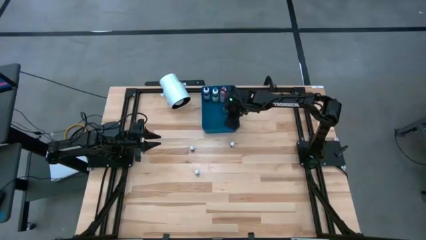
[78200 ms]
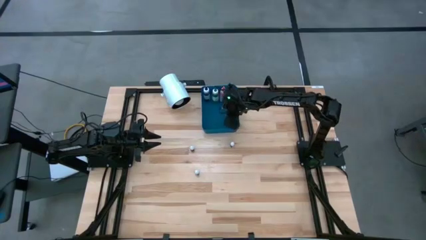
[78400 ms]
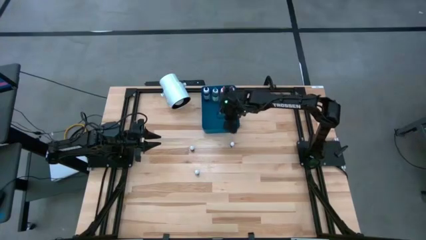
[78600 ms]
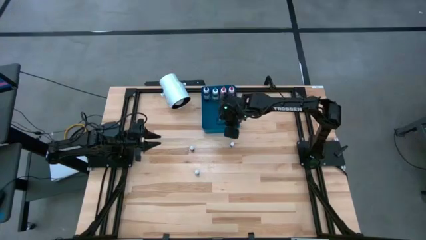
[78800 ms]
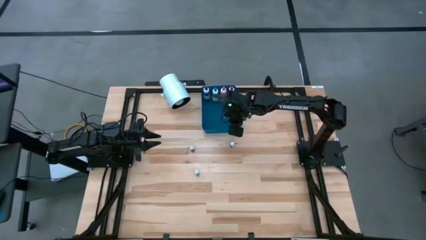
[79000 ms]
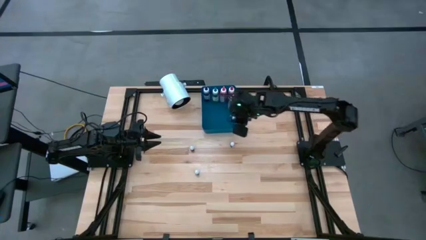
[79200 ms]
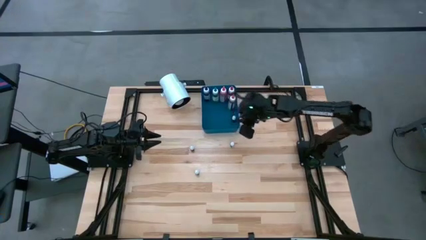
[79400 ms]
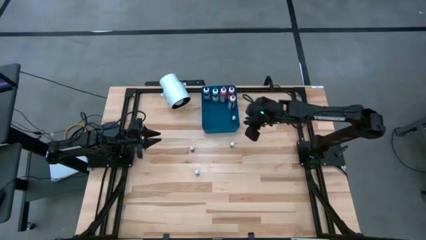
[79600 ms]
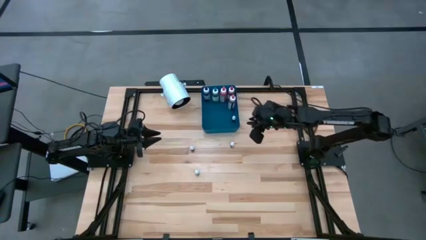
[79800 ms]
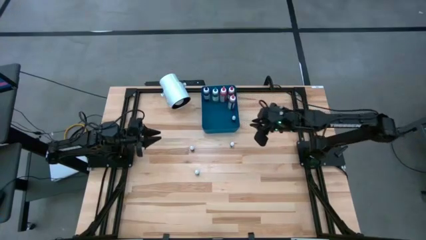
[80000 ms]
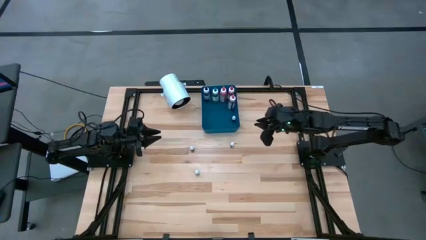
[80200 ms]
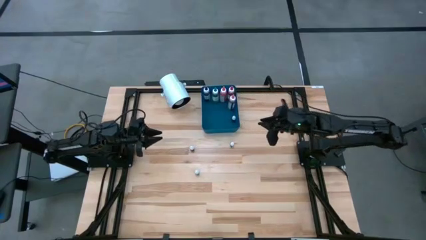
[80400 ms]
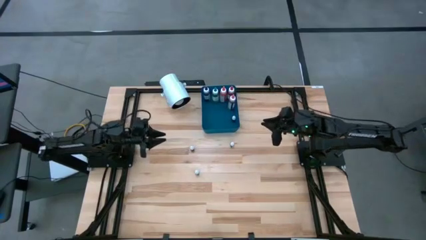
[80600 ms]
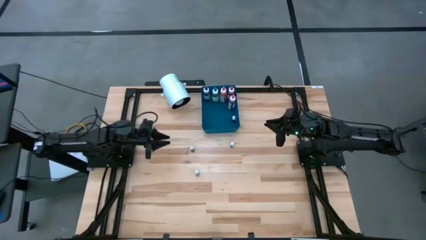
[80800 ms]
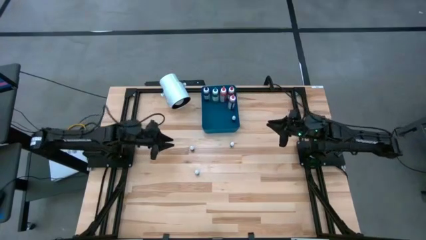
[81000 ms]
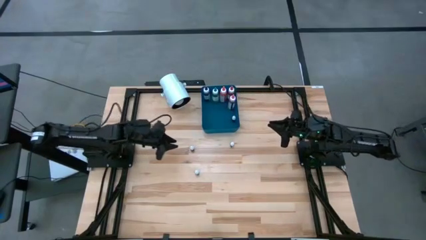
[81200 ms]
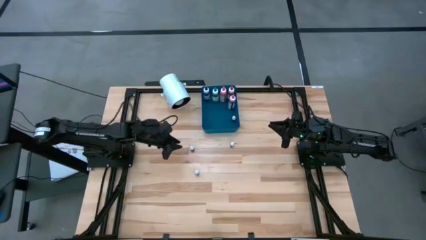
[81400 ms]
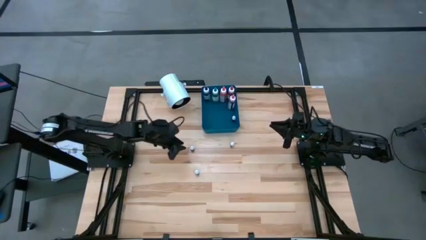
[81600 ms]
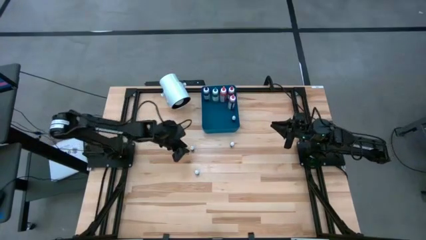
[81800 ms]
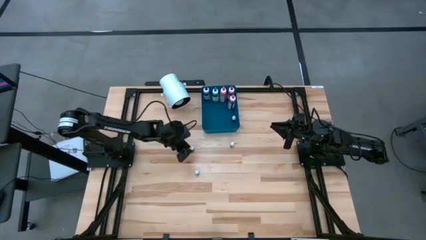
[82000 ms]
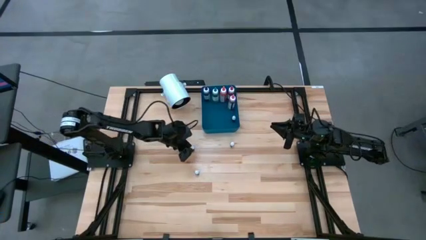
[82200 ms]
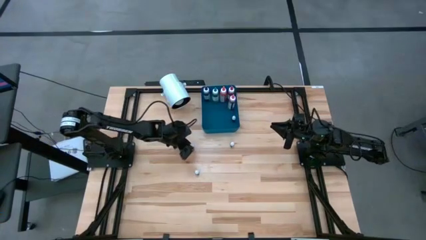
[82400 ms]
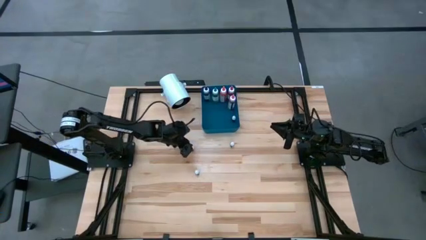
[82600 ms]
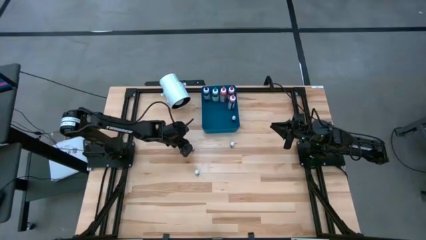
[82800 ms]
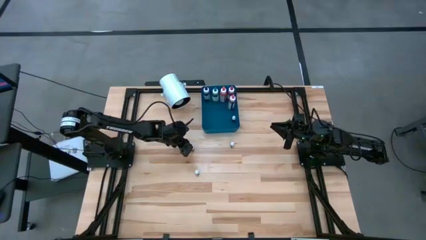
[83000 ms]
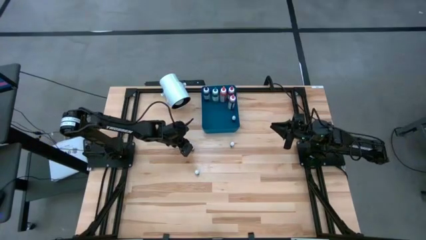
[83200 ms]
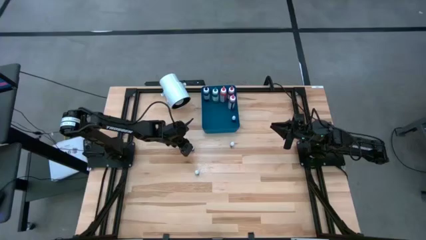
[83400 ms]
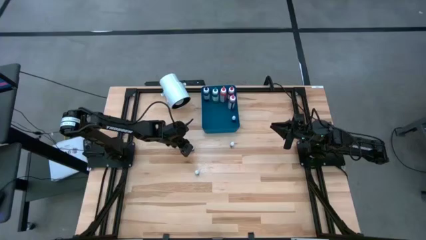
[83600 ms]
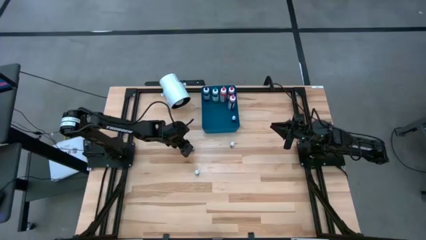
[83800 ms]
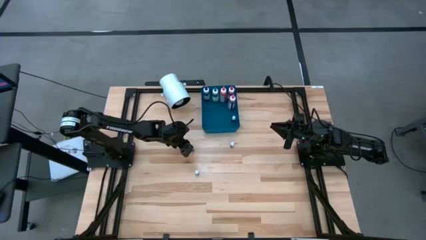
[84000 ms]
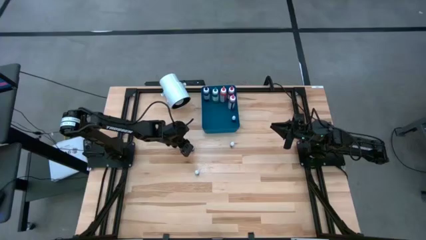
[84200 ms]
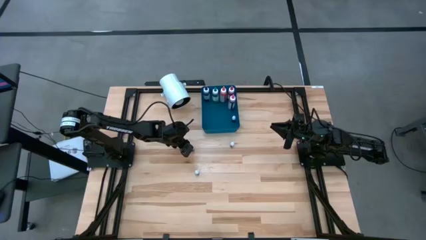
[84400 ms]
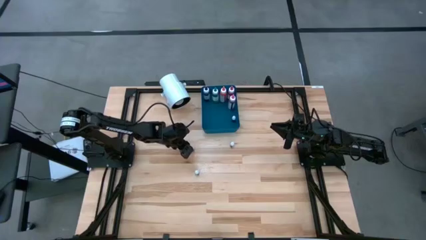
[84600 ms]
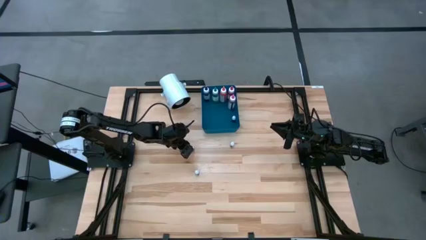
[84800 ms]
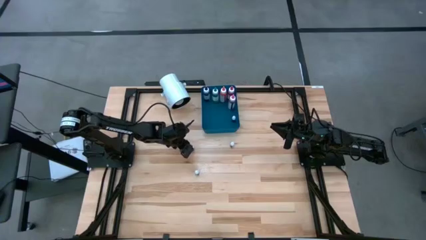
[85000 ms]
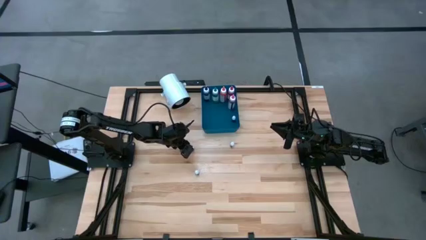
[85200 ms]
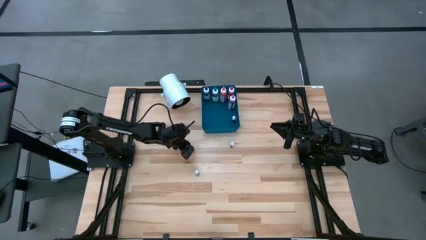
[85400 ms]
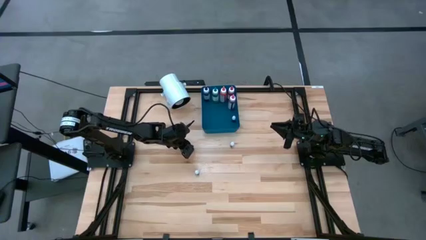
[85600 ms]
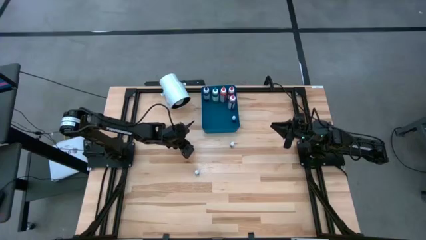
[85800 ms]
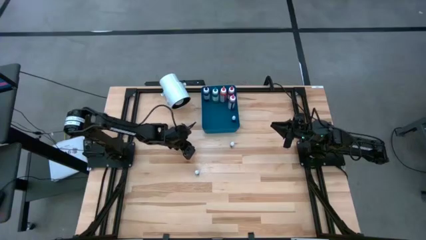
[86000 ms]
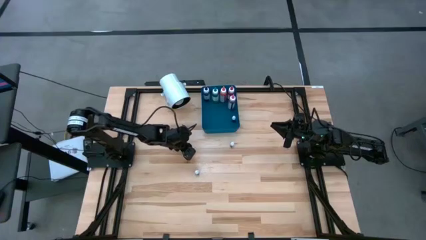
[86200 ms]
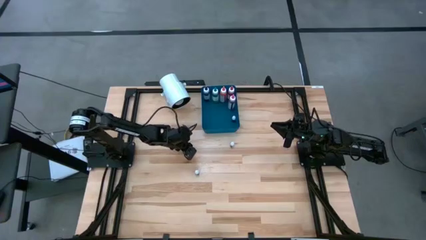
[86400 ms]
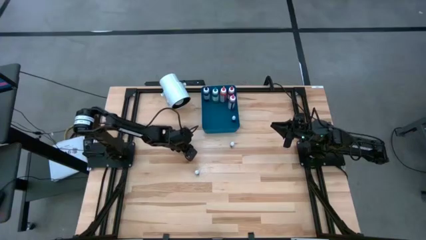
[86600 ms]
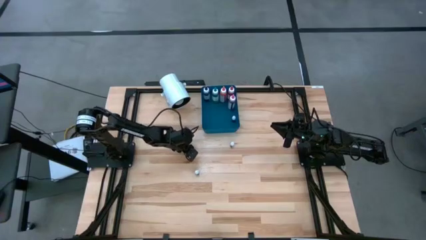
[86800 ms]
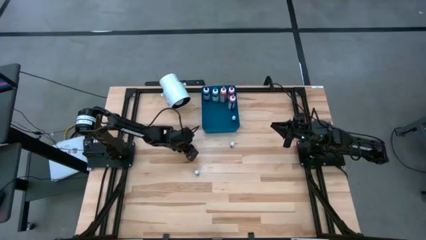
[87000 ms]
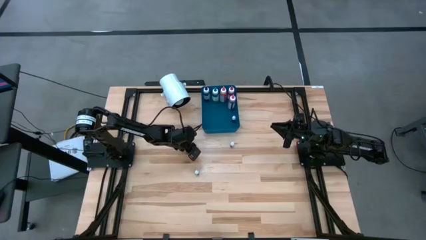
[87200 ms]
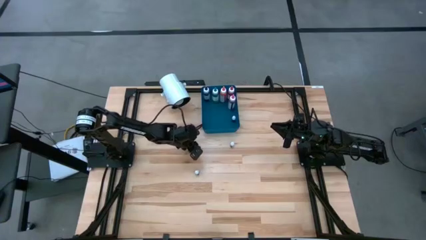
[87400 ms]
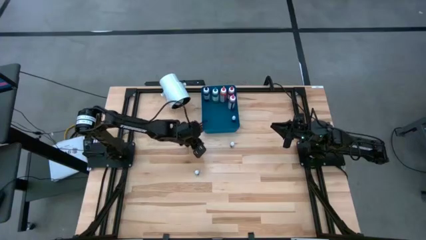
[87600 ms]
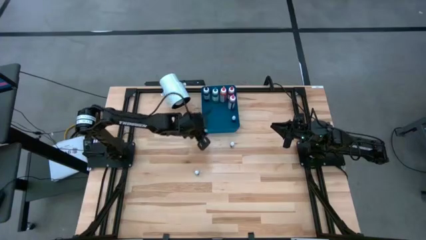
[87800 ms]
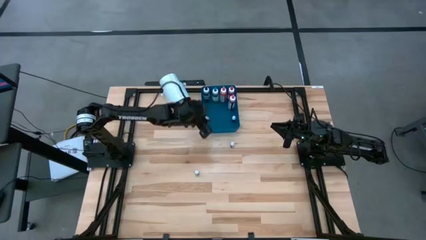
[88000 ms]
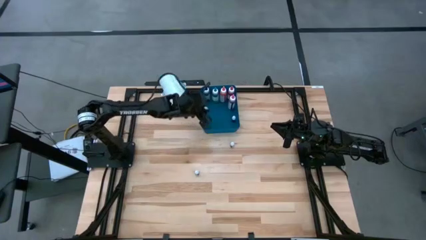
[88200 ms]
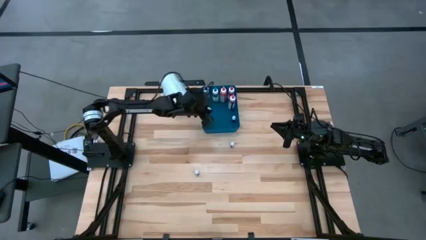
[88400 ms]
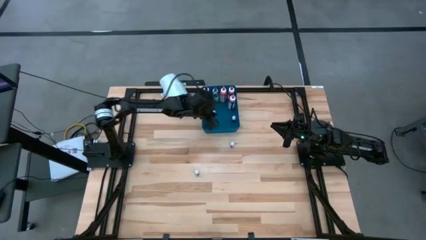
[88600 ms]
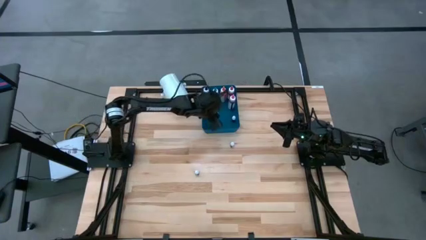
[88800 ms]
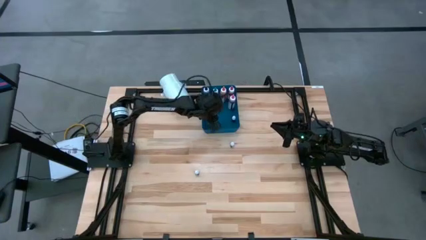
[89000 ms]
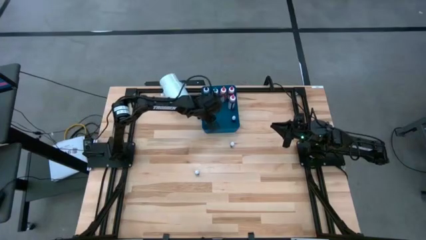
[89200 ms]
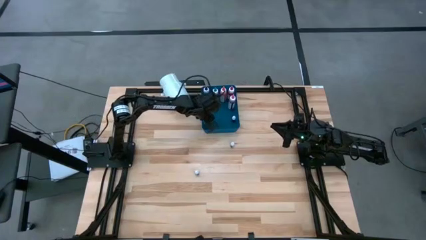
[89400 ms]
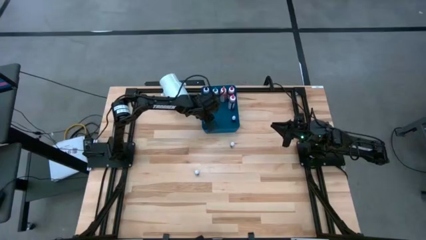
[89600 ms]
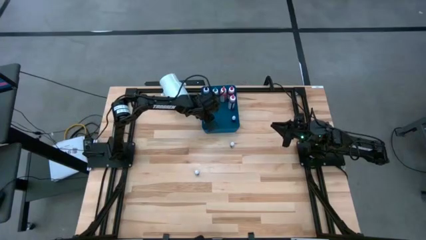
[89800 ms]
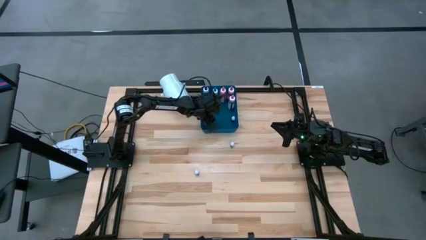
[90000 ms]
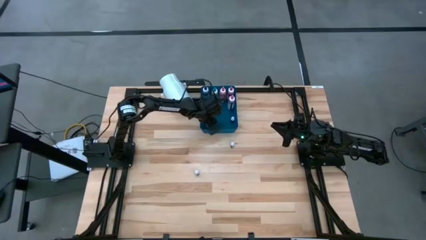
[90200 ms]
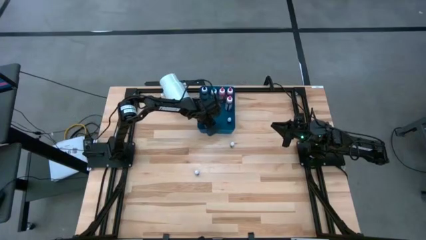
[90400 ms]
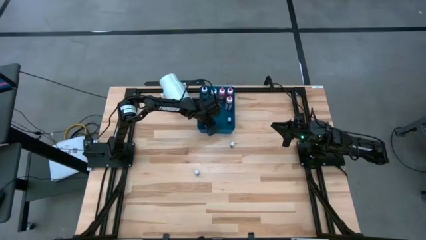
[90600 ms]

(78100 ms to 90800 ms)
Task: Pick & Place food coloring
Put the small purple food coloring bottle into the blue bin

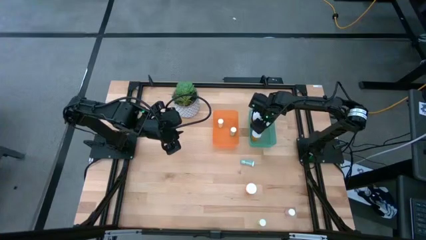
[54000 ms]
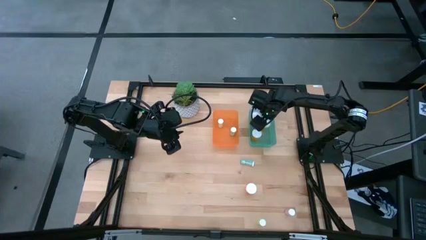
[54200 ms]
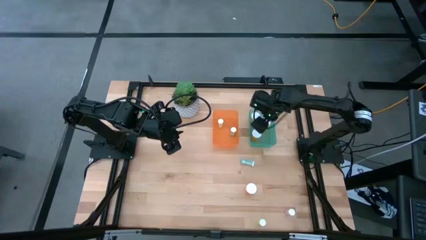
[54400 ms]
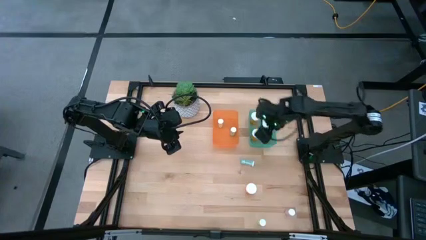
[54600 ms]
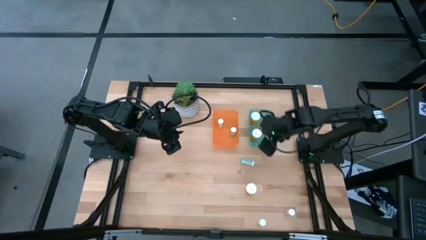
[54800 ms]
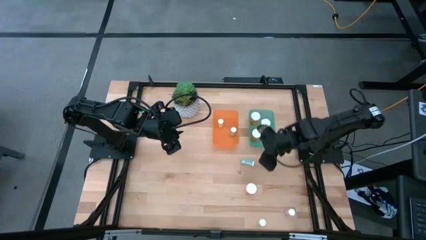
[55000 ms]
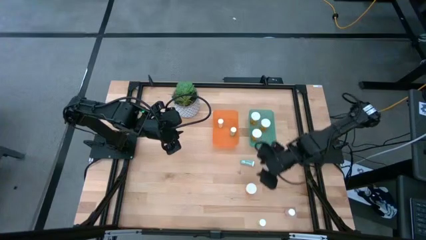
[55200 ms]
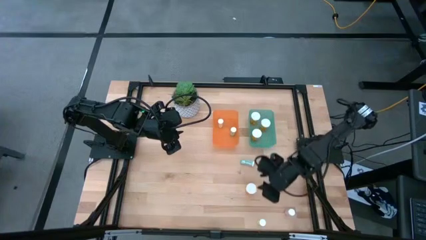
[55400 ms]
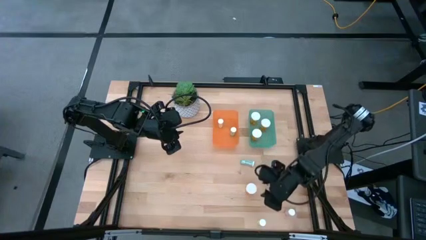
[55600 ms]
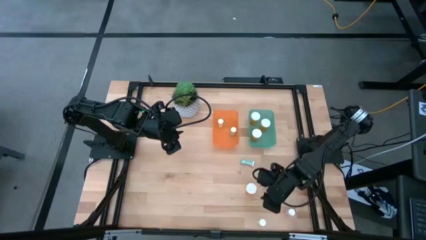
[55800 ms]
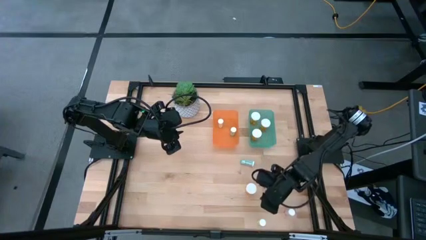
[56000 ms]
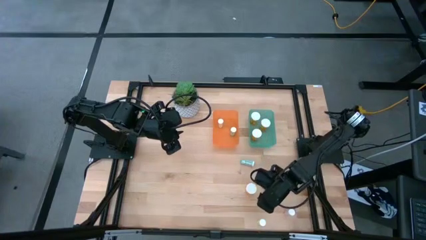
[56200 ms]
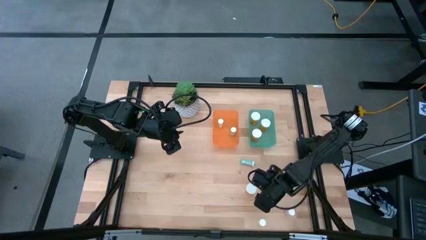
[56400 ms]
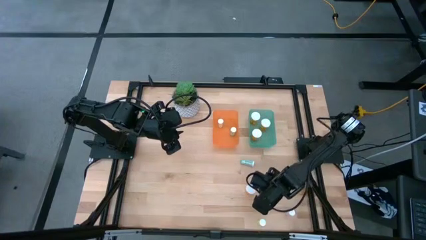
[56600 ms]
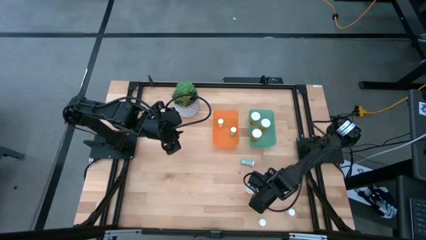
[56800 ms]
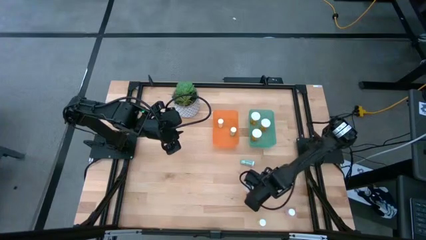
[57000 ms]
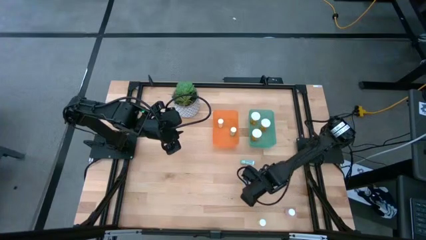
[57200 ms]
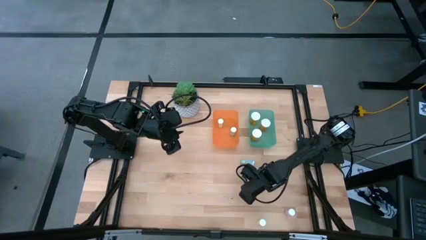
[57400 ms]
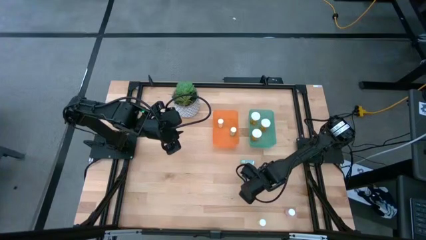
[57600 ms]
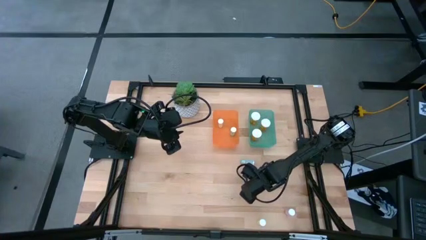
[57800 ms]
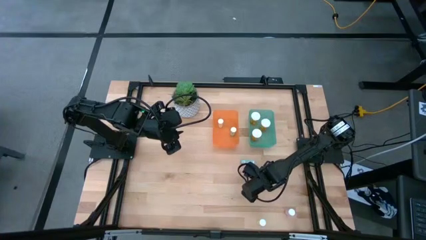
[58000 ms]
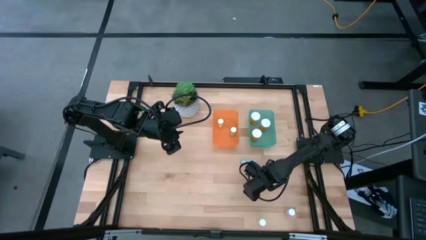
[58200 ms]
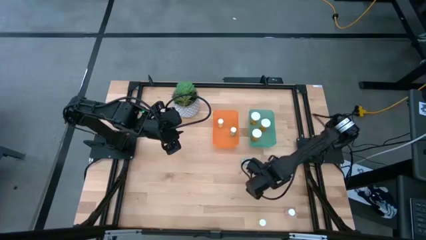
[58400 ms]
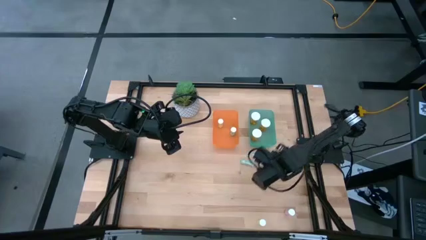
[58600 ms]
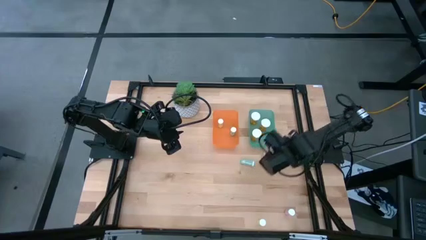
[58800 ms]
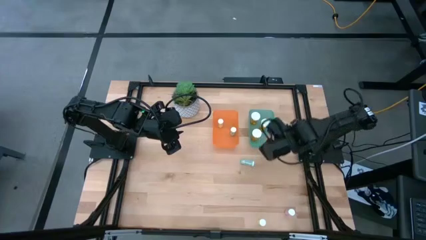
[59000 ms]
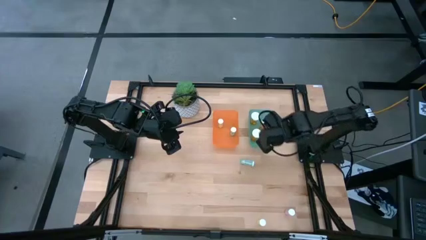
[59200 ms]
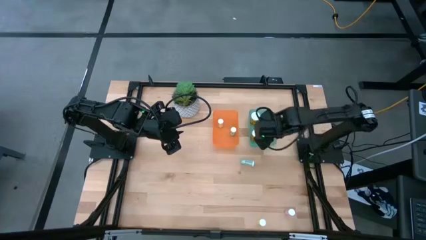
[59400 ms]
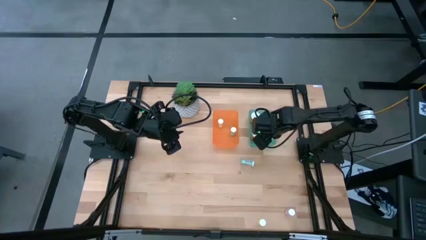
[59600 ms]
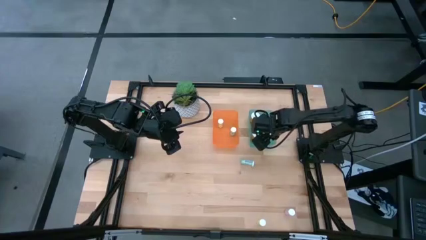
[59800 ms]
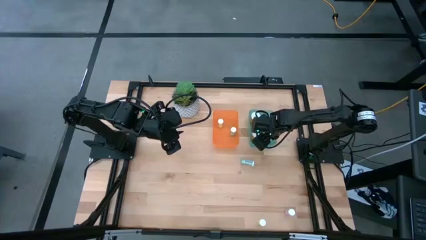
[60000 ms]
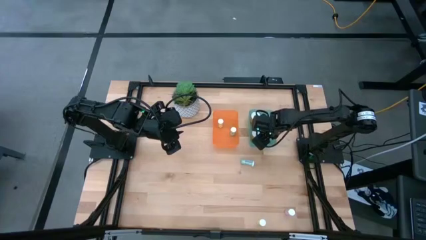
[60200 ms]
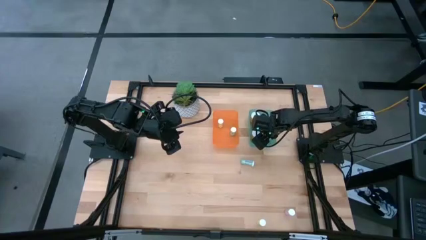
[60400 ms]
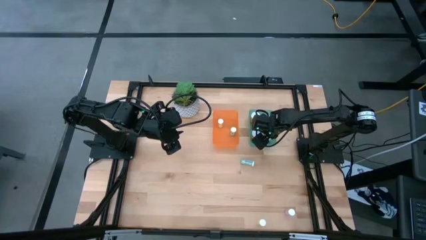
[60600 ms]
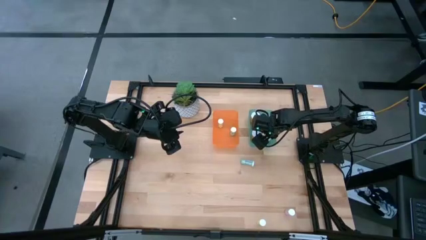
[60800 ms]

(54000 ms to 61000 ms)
Task: Pick and place medicine bottles into bin by pill shape (circle, oval)
Put the large orange bottle into the green bin
